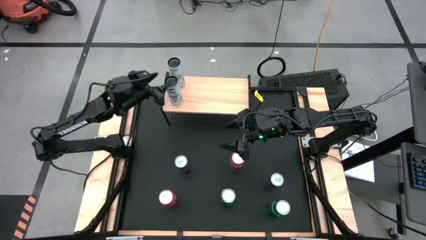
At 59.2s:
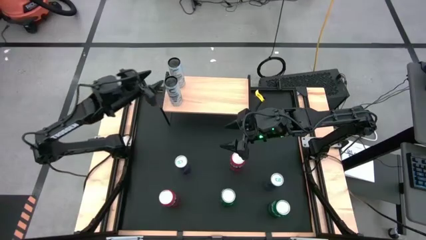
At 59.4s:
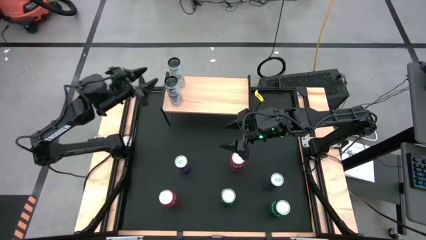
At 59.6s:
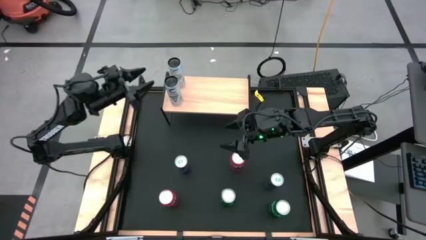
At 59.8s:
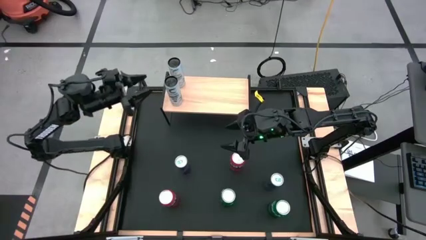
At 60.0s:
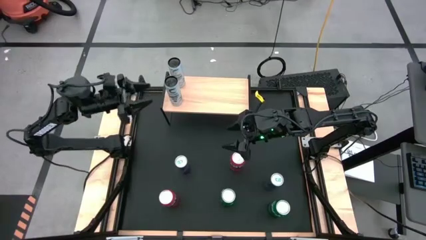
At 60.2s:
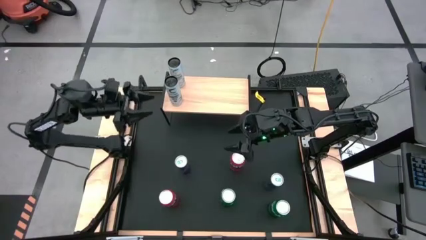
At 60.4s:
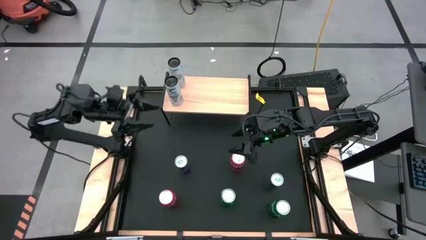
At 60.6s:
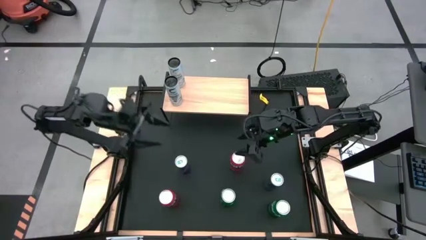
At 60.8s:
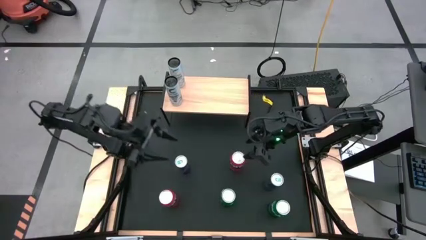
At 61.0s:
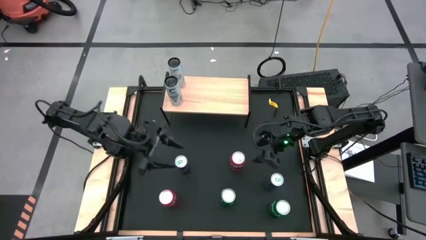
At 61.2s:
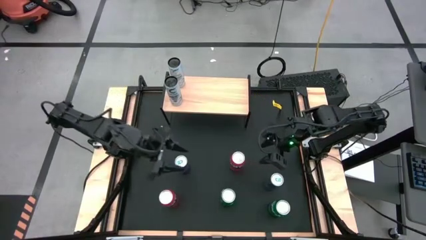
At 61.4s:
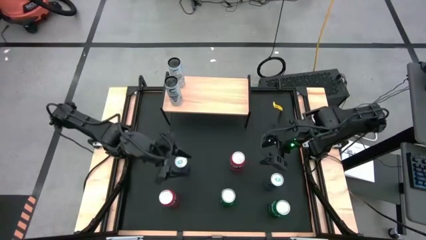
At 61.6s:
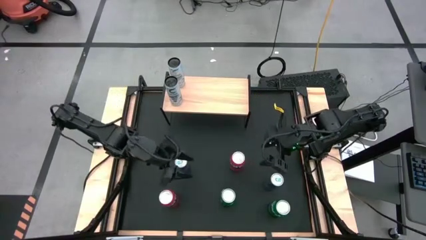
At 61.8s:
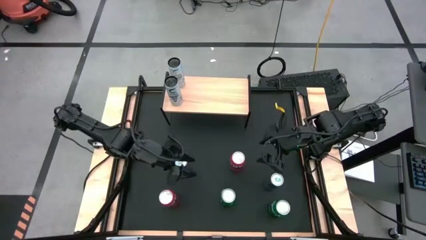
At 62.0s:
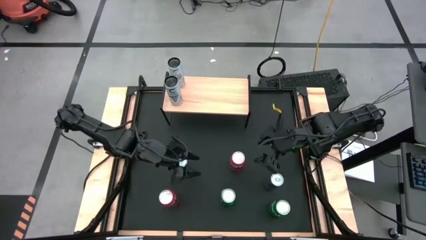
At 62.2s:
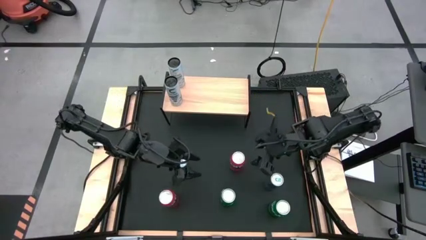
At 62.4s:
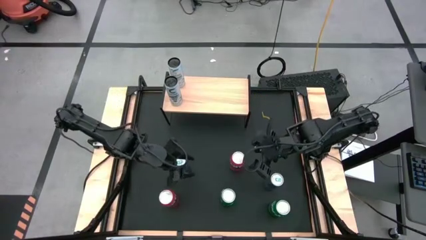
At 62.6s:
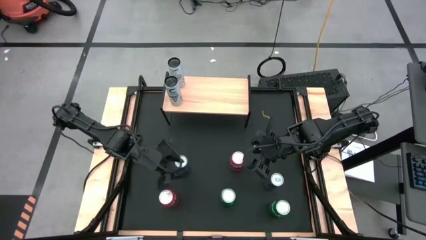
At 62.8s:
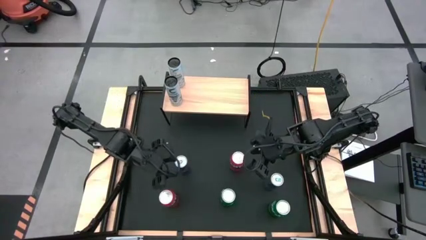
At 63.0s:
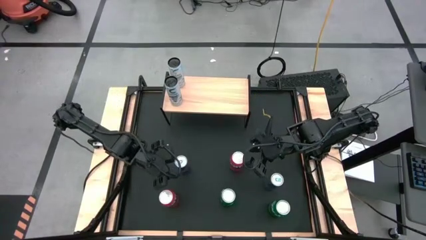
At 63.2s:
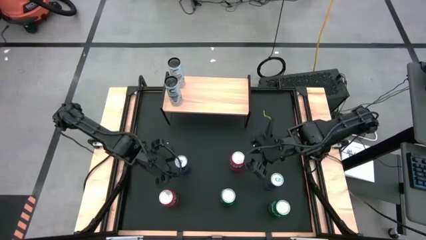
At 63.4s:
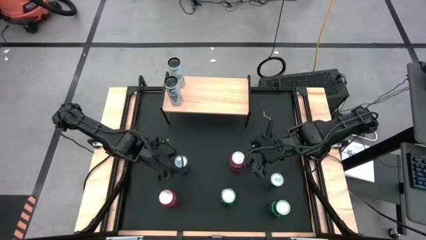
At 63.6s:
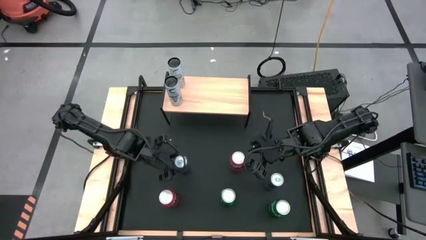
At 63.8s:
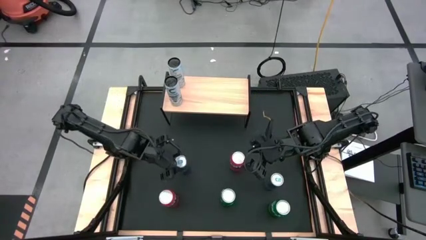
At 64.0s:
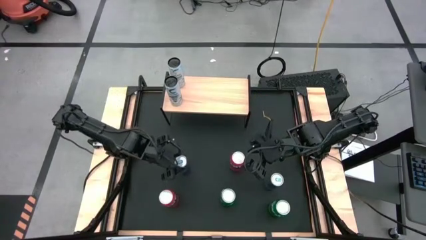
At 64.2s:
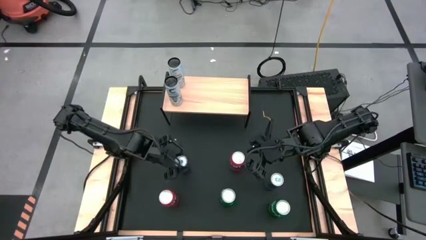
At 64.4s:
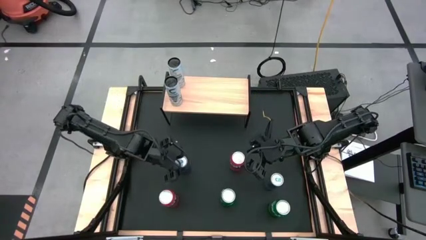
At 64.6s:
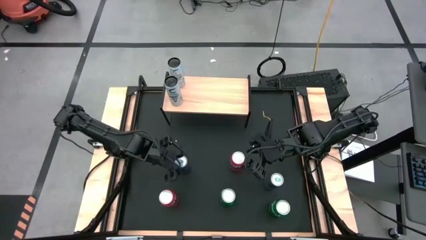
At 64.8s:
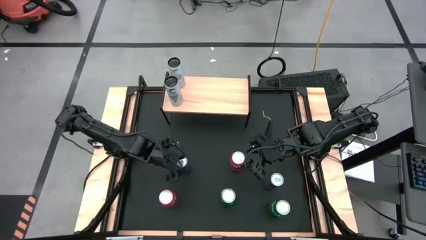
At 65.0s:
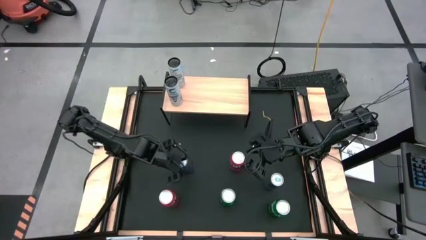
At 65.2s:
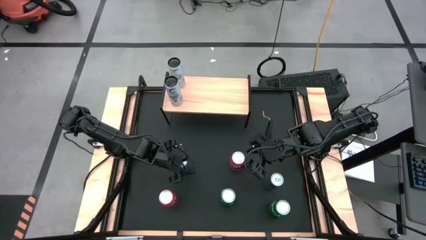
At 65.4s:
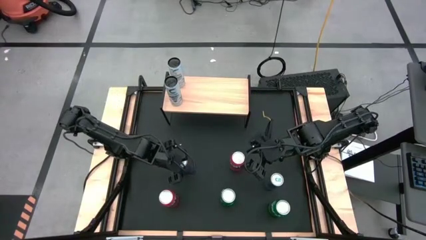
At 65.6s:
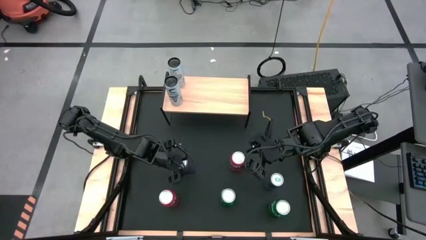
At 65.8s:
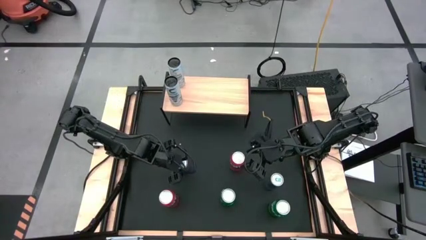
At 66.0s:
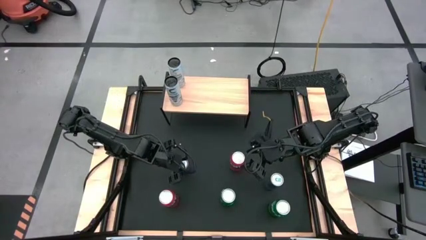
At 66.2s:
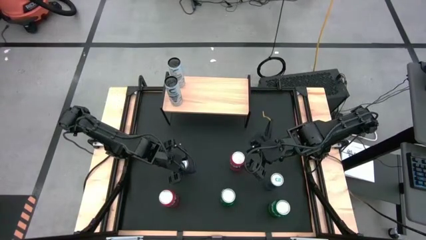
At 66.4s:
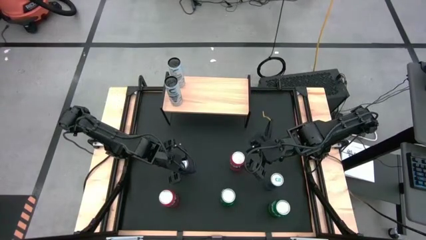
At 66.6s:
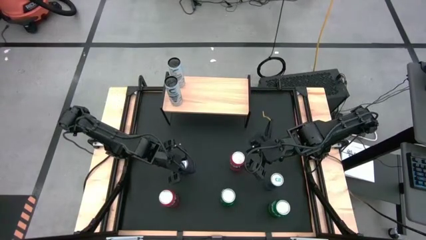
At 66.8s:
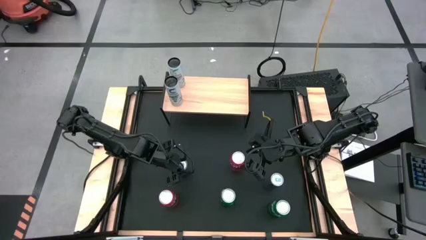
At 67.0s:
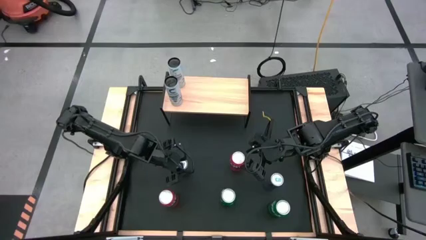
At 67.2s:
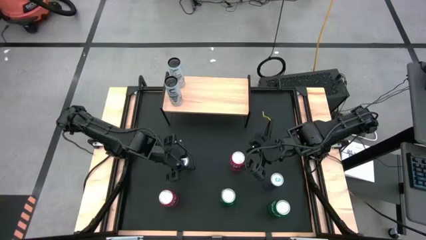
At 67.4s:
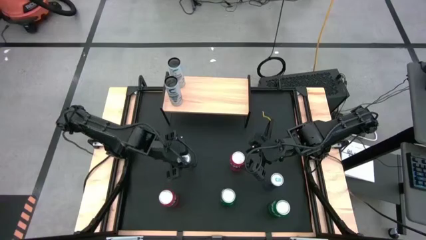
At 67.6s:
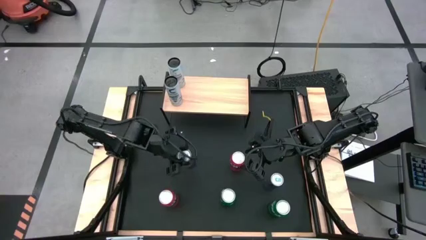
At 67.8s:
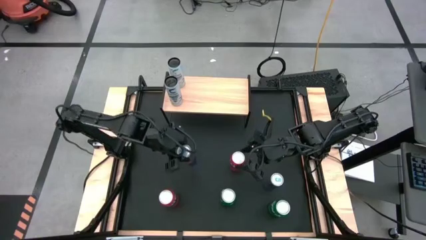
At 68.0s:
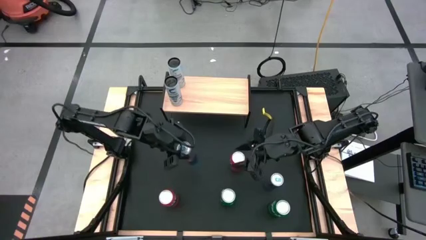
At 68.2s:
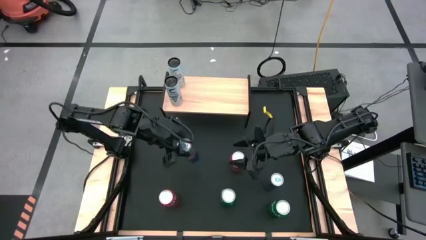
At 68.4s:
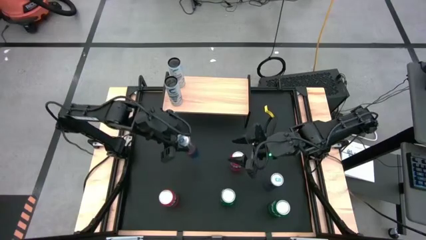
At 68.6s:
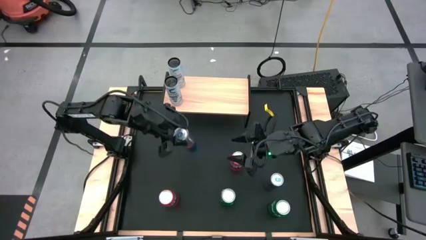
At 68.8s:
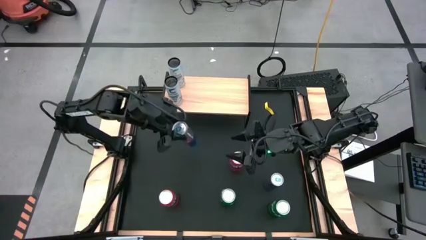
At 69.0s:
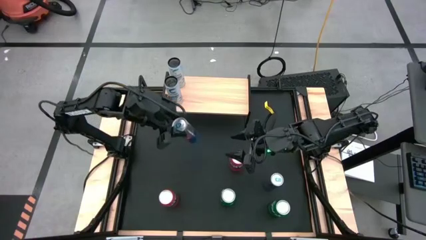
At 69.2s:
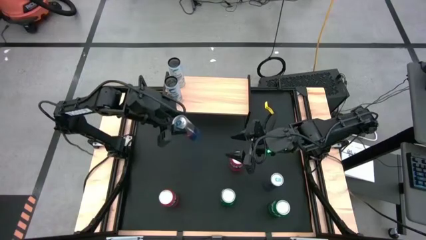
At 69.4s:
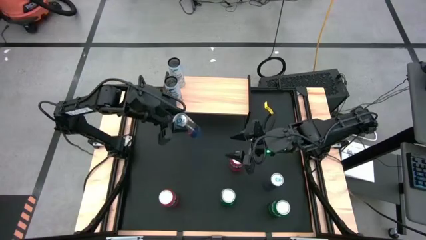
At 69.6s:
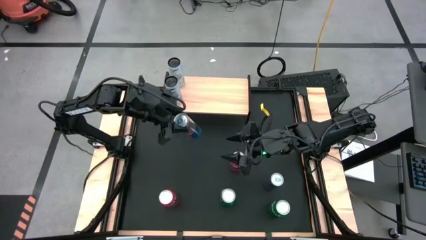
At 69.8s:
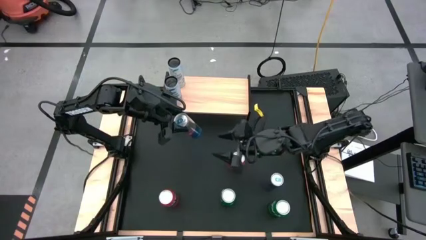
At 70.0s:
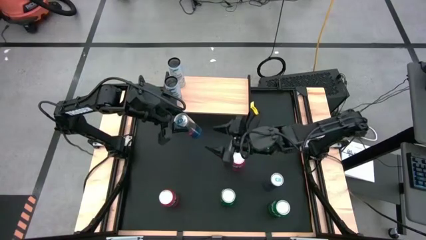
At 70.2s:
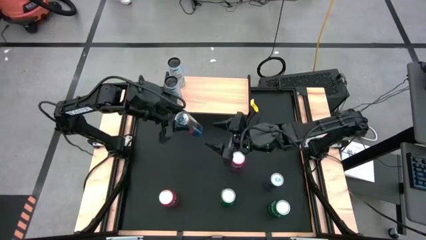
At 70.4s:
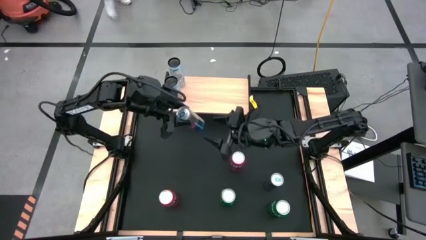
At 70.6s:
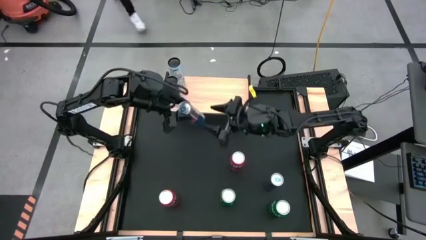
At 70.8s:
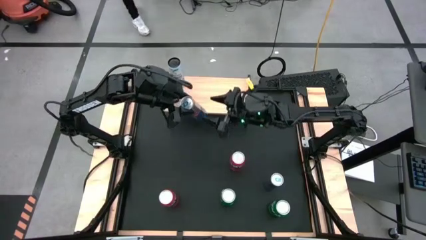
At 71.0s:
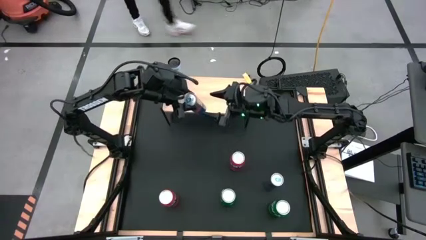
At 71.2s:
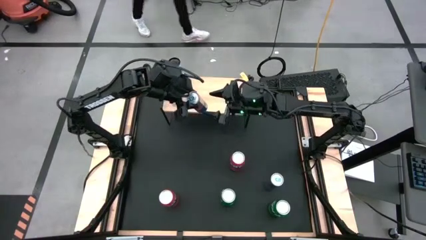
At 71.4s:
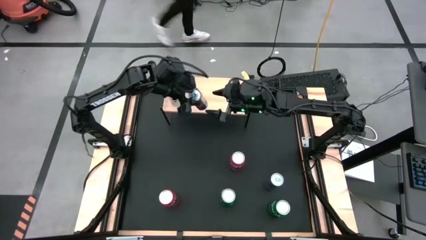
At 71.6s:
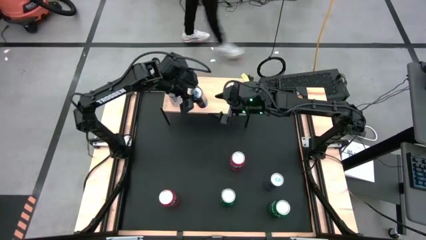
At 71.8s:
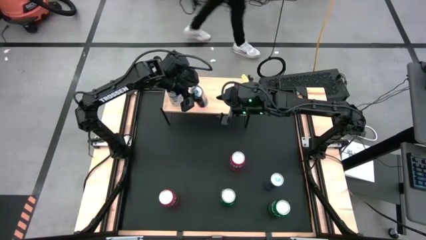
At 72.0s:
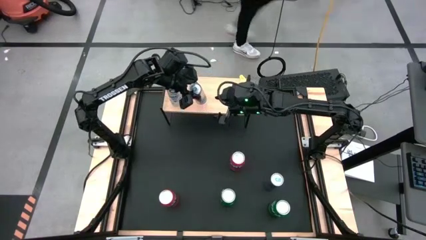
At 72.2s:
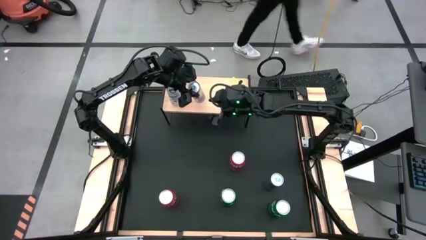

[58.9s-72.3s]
Task: Place canned beverage on shelf
Put the left blue soda can on the shelf

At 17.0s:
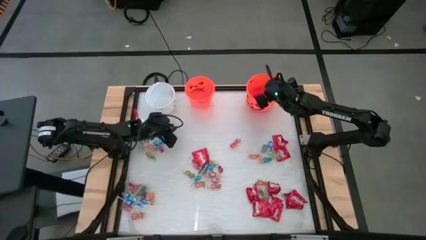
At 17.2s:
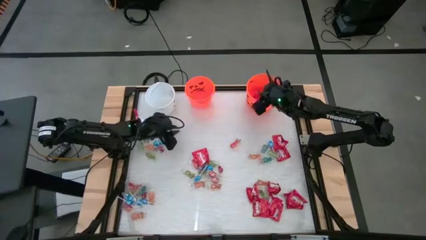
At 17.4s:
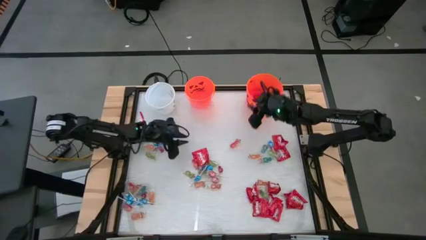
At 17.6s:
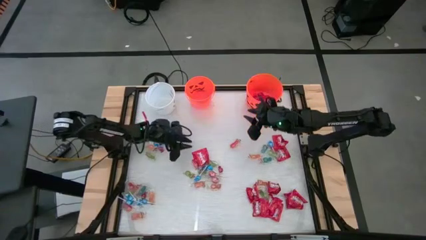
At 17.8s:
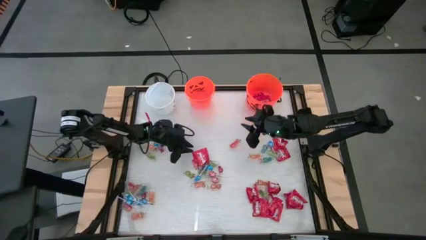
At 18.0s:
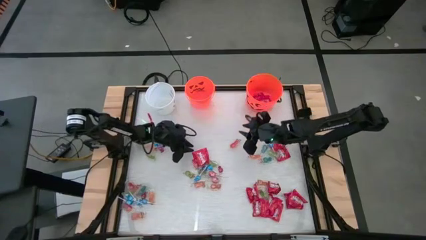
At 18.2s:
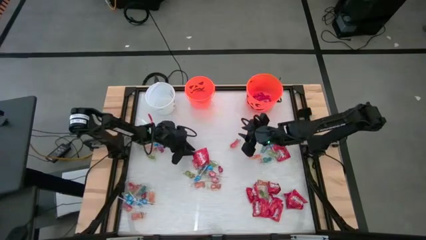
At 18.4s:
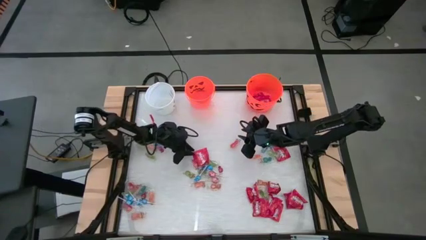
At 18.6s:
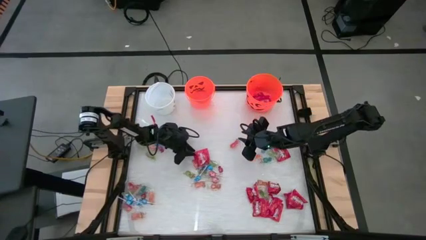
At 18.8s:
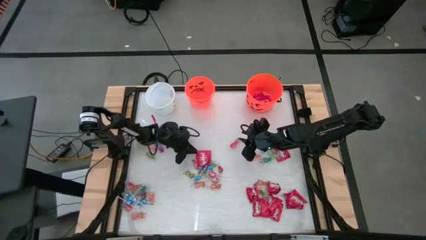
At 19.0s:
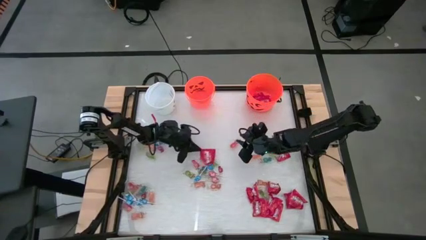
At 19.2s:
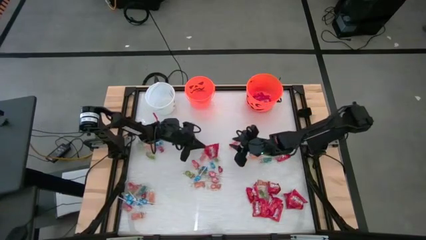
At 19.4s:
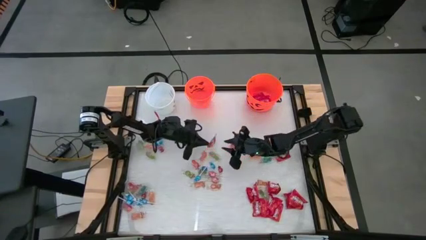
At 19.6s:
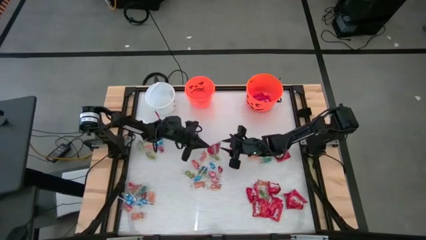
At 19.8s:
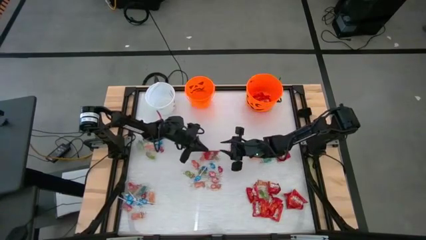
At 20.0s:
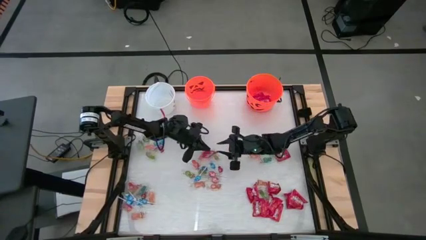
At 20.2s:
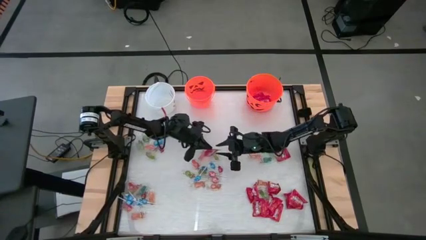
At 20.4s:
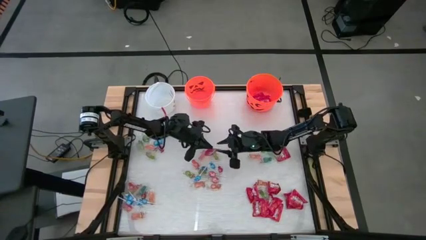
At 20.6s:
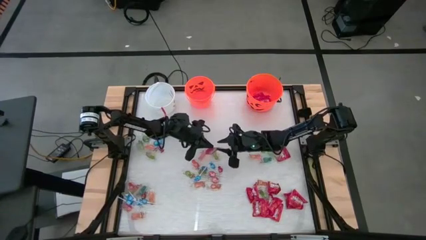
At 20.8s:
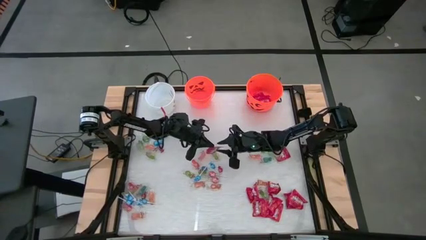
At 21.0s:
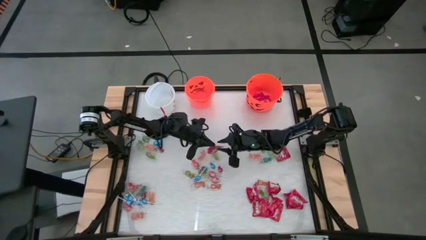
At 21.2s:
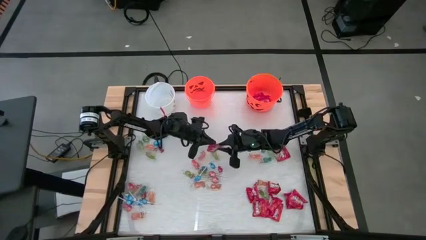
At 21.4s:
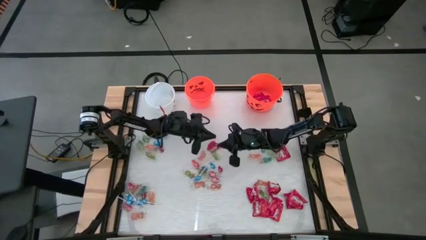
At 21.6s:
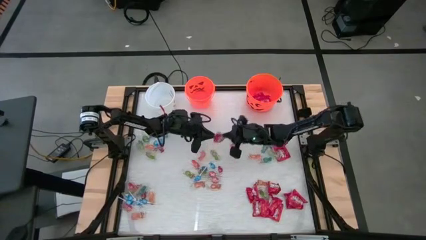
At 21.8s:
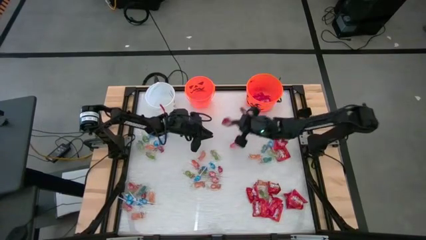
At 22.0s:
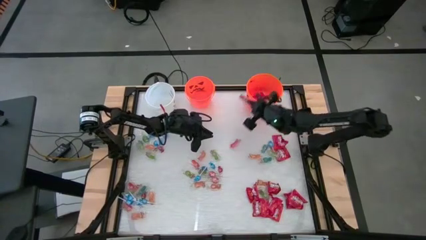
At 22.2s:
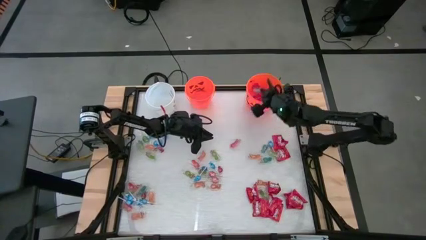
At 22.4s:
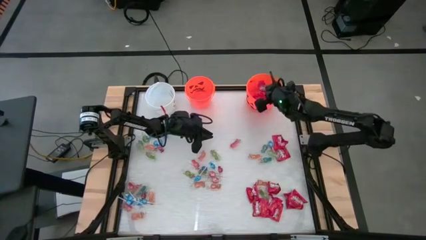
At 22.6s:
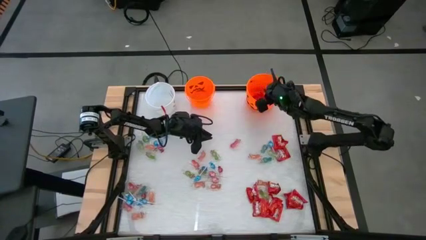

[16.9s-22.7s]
Task: Sort candy by brand, put in halloween buckets
Put the red candy into the right orange bucket
